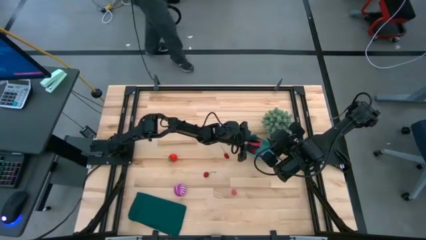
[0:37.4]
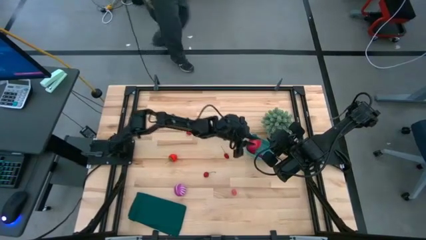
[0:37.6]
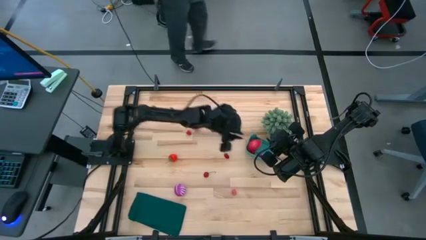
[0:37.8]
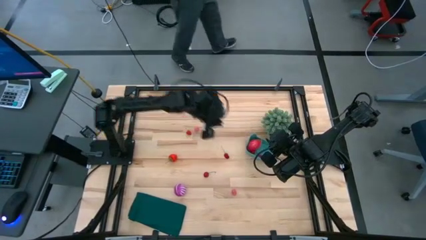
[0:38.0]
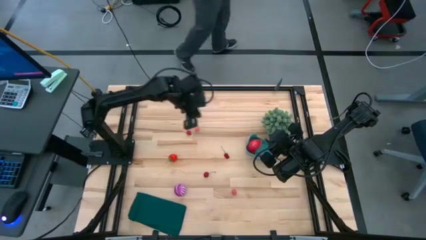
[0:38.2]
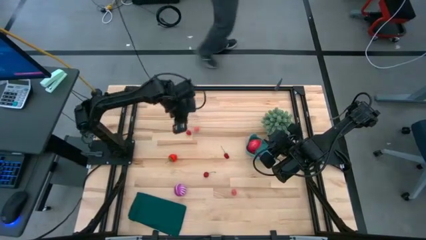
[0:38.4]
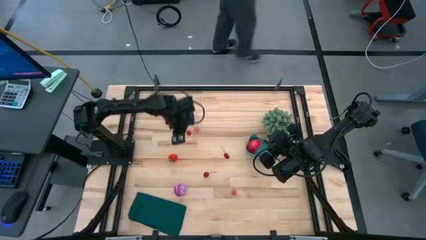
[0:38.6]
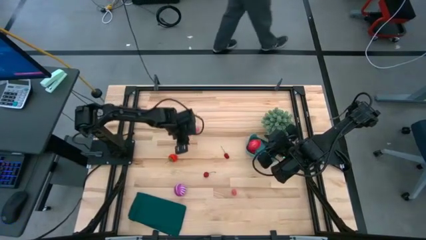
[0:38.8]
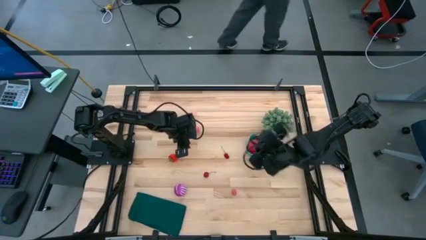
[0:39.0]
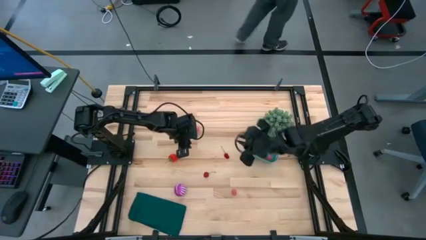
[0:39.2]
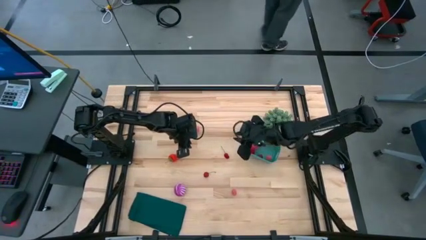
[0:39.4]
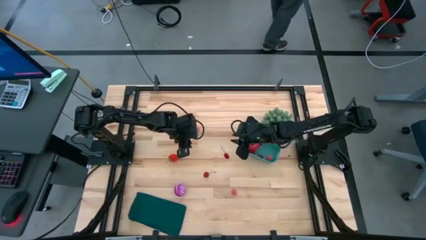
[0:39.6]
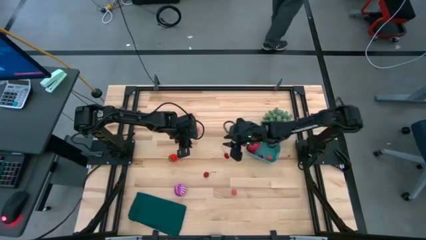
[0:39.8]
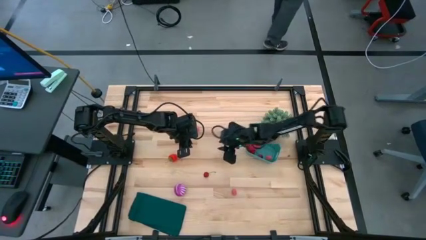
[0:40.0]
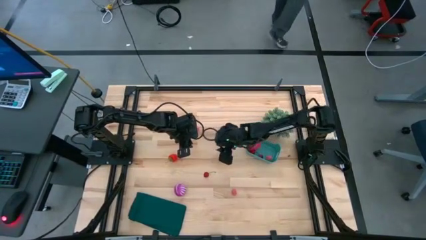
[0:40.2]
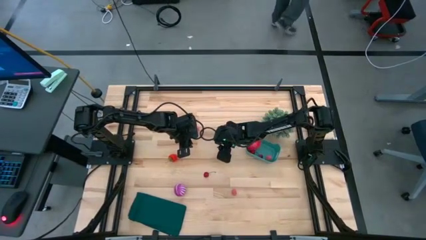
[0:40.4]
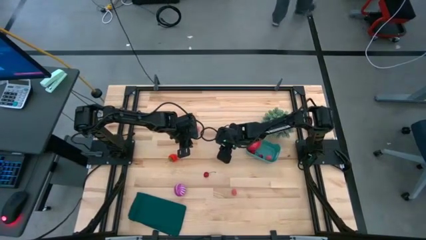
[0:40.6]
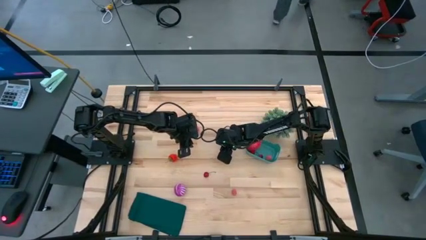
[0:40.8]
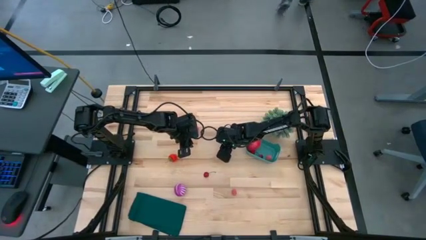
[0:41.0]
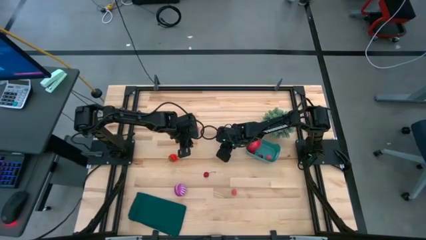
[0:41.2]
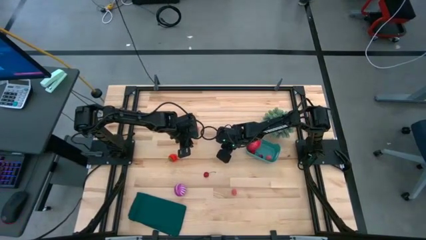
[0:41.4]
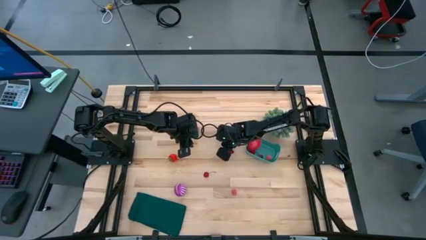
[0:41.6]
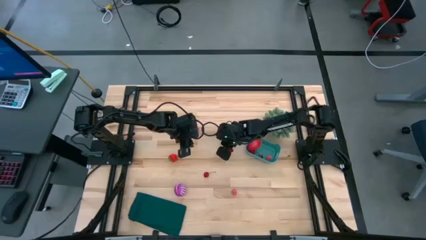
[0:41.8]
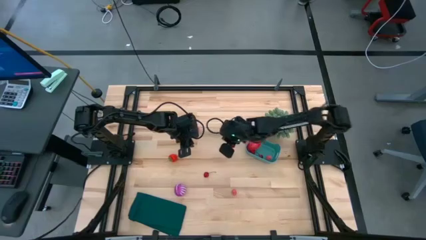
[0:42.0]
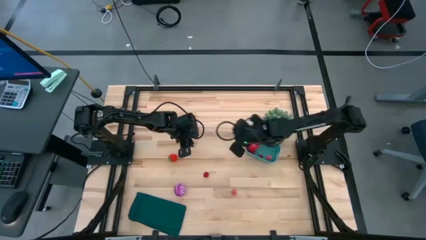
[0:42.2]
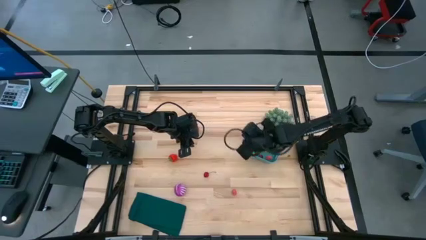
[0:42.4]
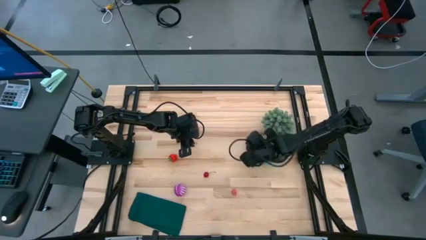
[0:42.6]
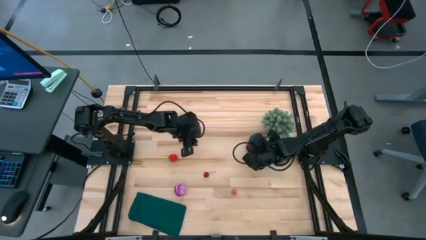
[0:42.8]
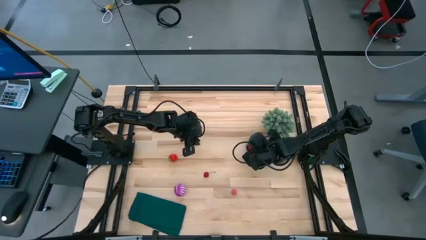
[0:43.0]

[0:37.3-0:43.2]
Task: Pick and placing Produce into tupperware
Put the cherry into the green bin

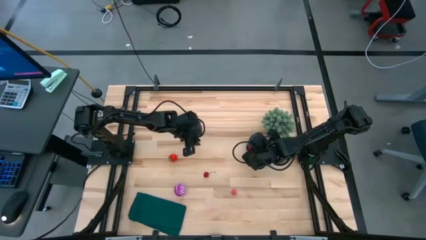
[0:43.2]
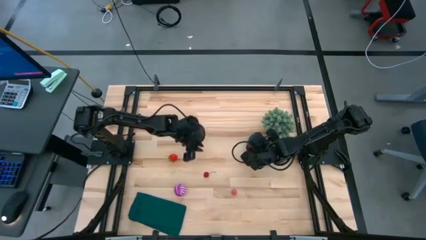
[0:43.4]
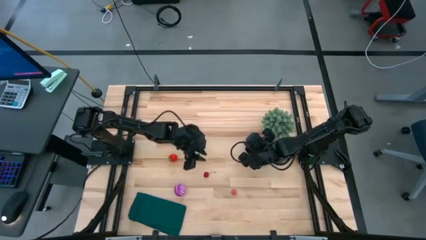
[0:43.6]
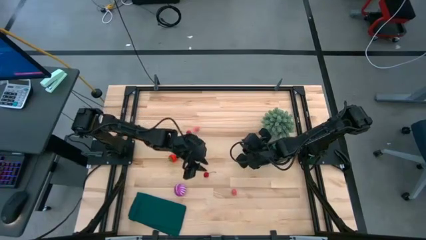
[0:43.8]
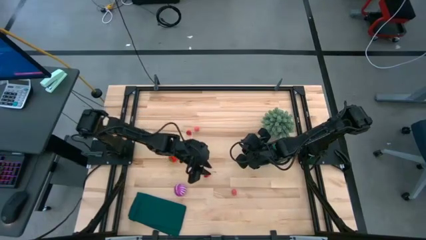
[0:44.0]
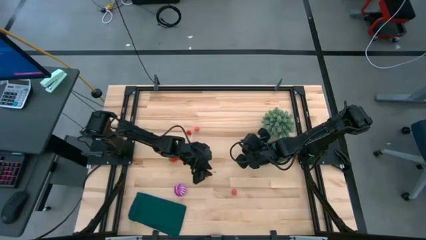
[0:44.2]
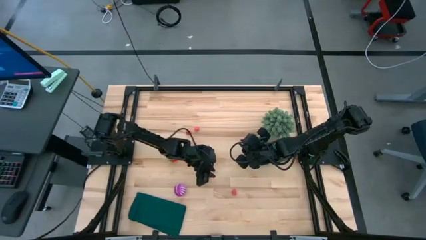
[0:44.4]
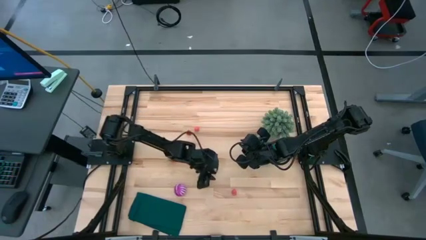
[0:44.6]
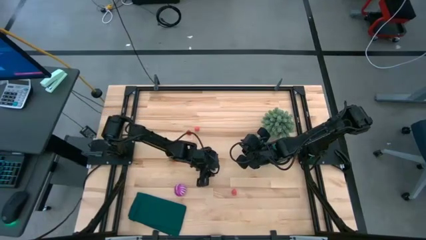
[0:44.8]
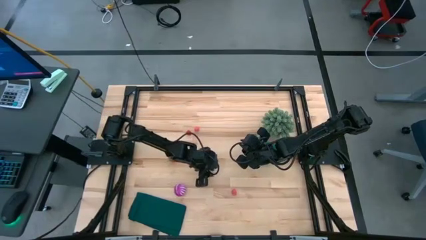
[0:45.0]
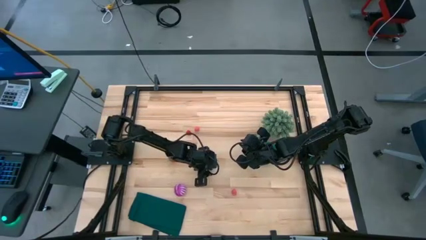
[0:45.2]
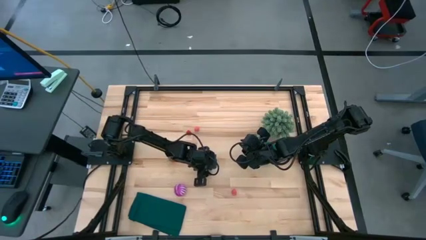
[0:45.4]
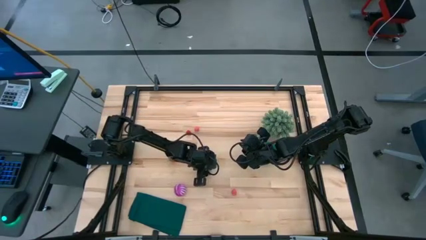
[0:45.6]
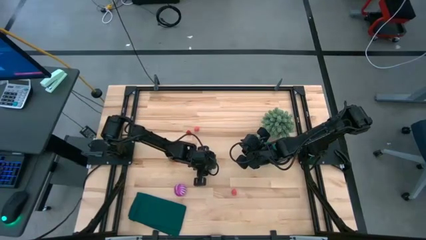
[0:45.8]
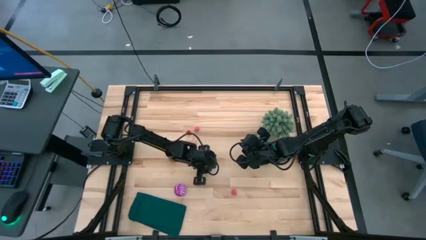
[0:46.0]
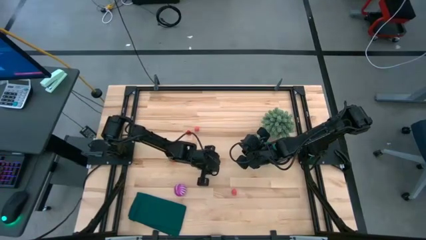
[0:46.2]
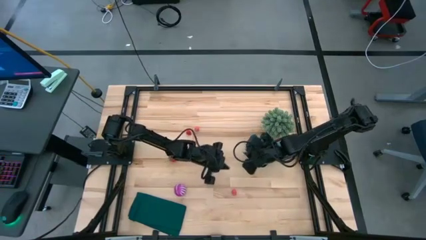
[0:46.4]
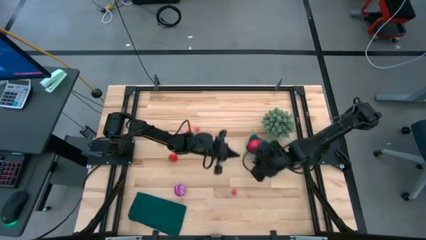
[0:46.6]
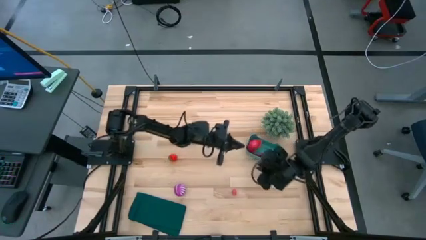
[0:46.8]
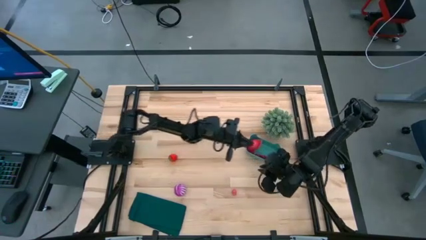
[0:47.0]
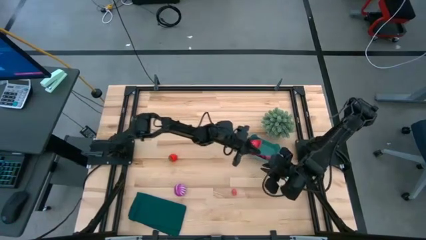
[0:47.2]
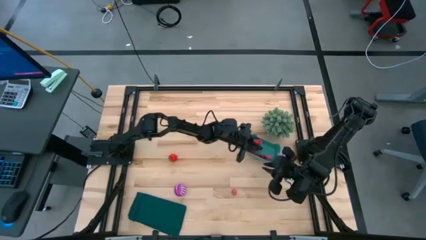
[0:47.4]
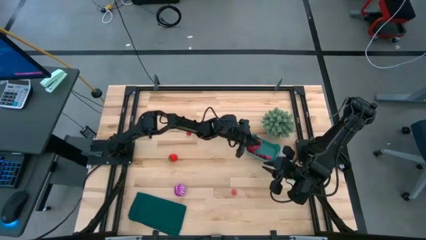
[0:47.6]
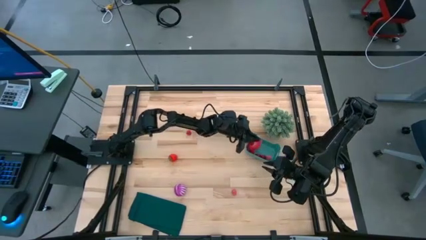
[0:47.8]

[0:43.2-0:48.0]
Put the cherry into the green bin

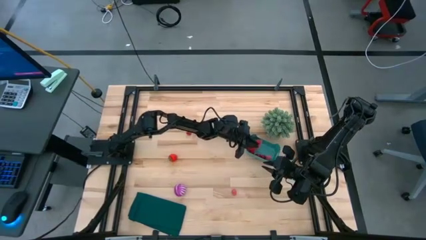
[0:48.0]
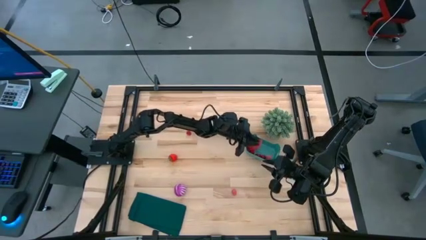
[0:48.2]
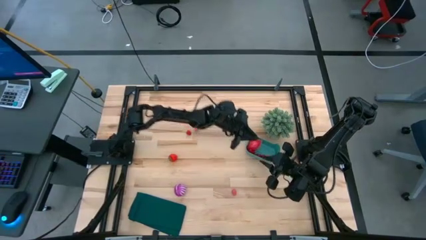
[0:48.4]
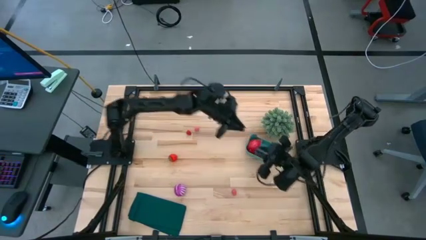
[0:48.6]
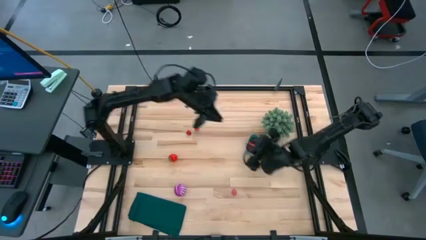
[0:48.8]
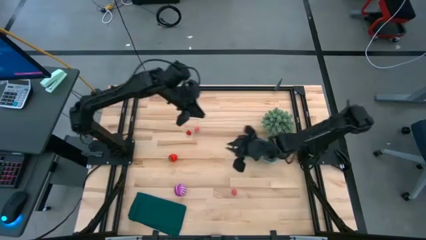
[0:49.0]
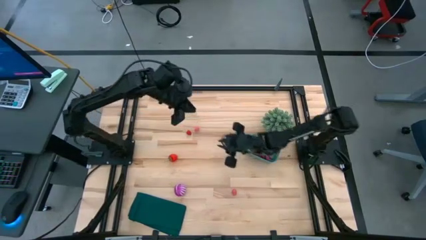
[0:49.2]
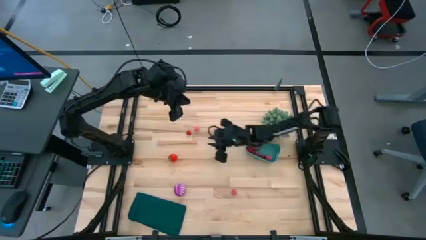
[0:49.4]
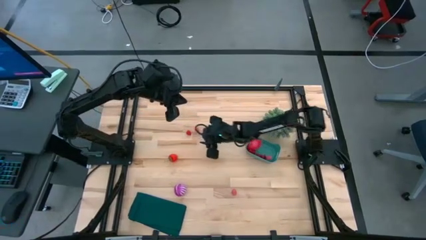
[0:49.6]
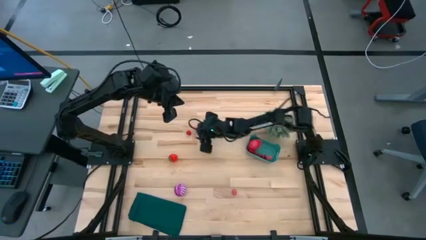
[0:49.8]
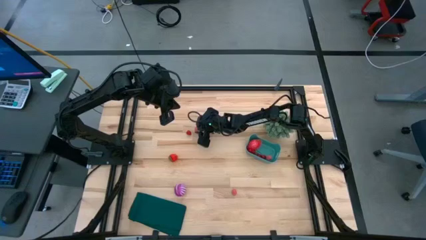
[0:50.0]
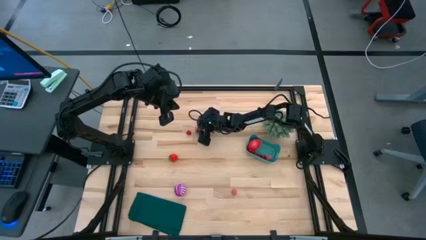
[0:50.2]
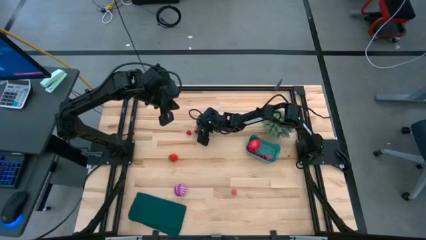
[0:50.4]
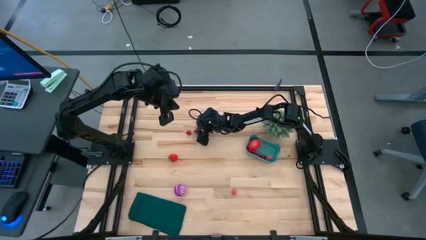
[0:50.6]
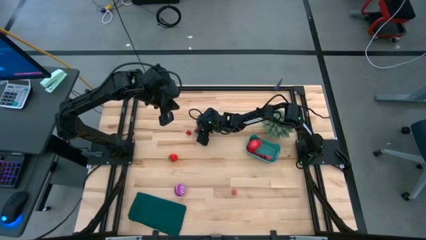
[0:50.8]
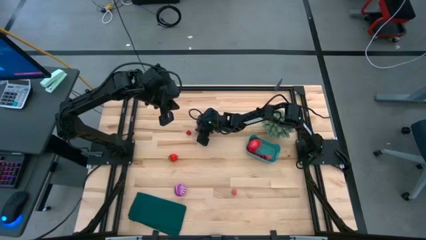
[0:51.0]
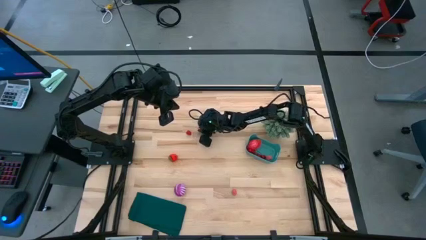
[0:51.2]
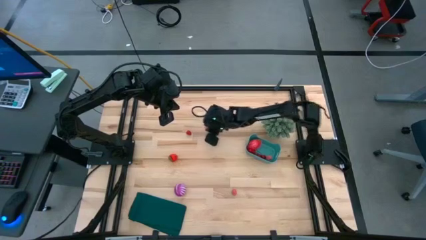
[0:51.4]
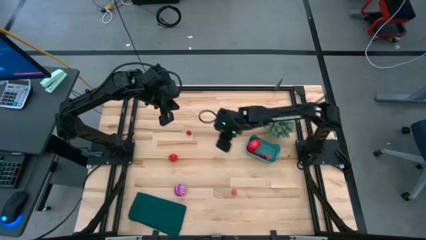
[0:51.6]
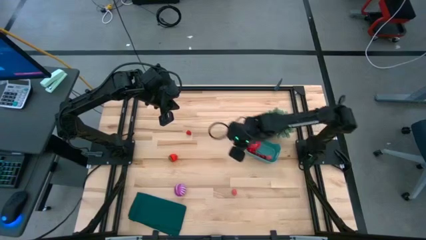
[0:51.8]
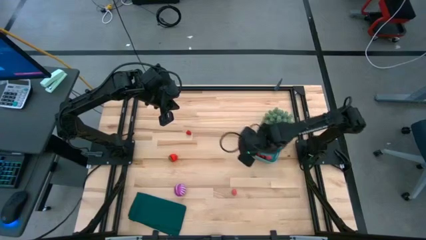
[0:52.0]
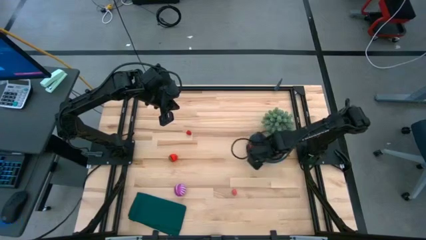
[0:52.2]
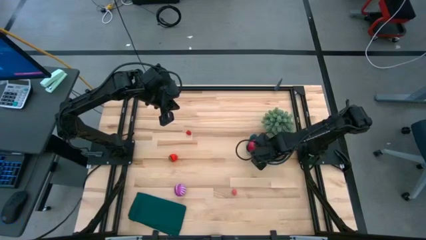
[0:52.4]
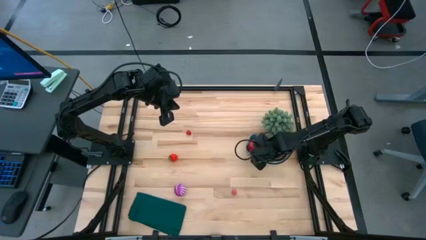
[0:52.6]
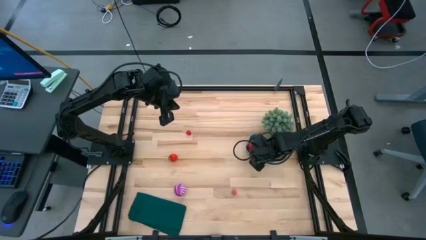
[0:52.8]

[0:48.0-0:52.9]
Put the peach into the green bin
